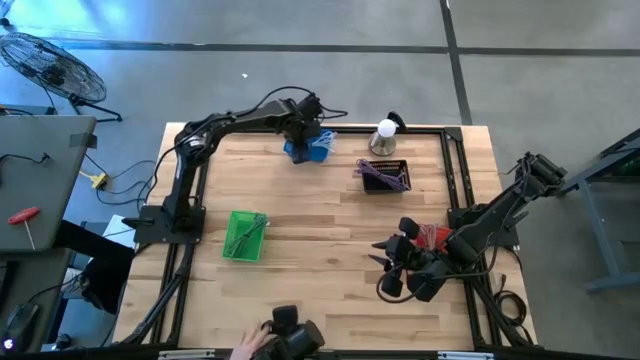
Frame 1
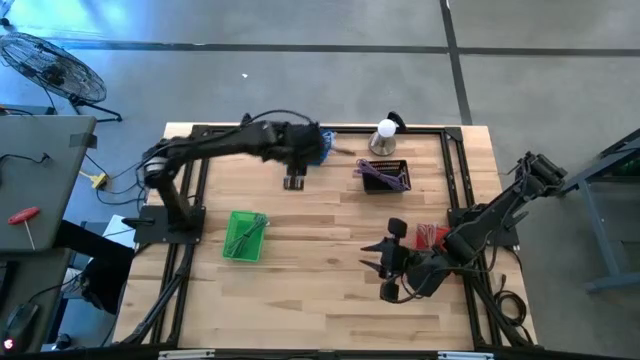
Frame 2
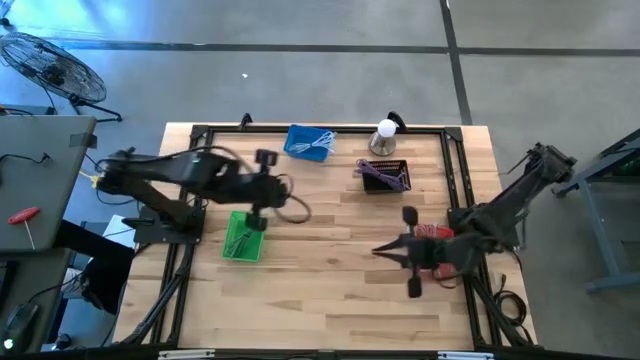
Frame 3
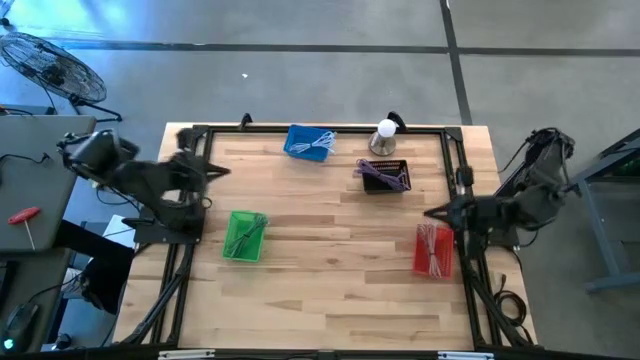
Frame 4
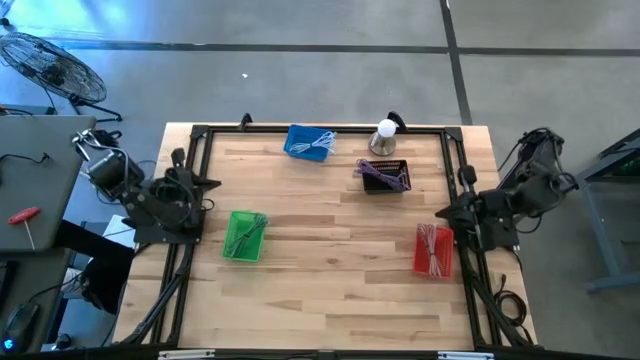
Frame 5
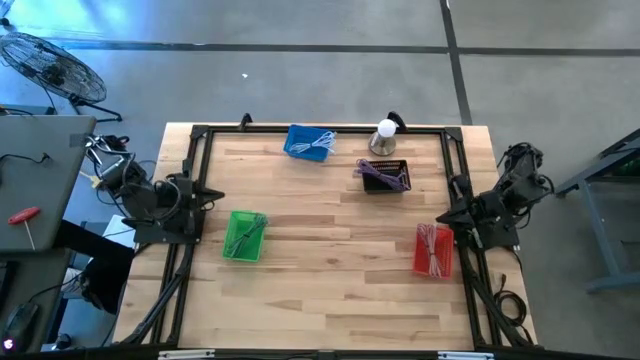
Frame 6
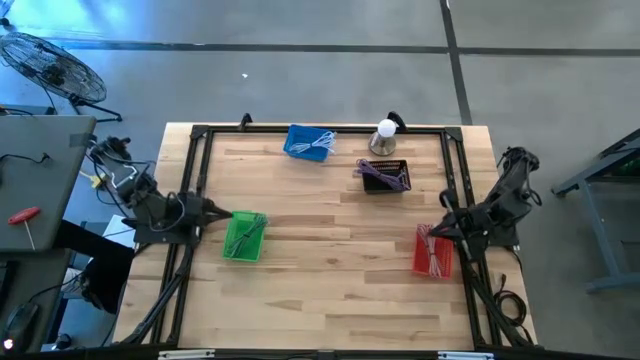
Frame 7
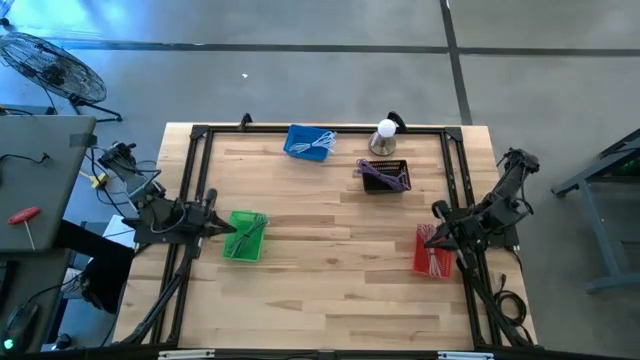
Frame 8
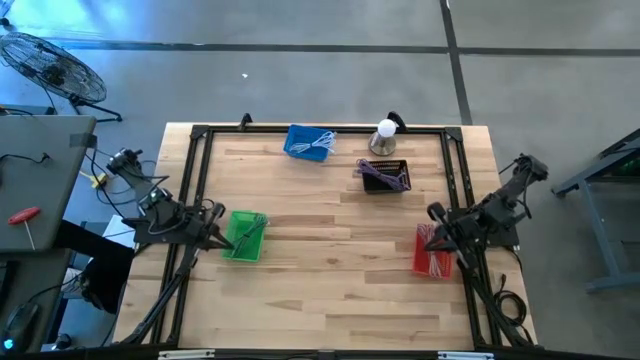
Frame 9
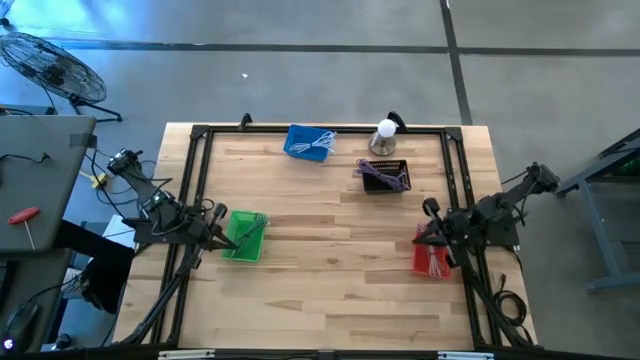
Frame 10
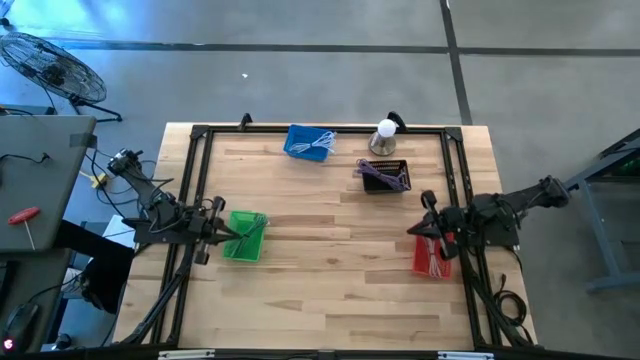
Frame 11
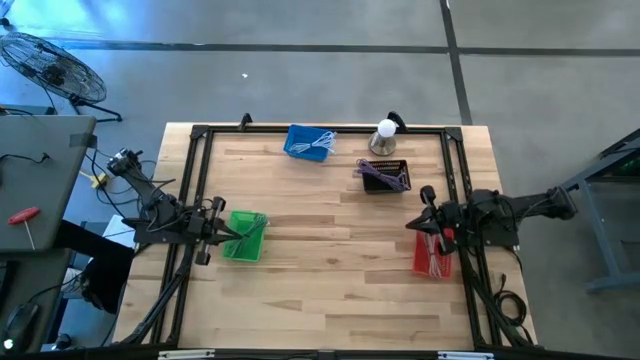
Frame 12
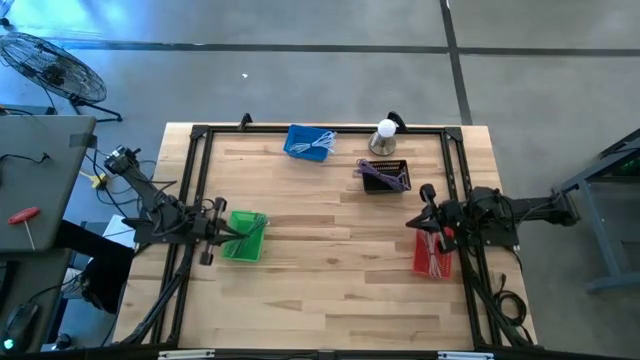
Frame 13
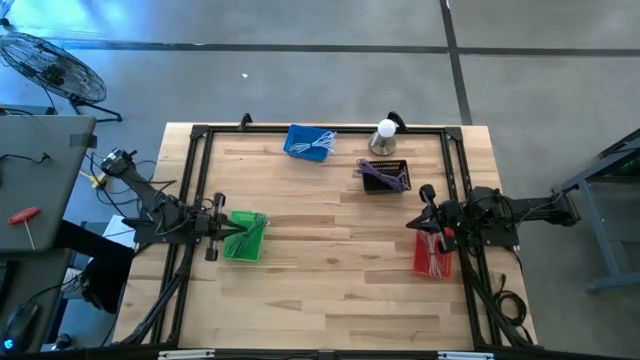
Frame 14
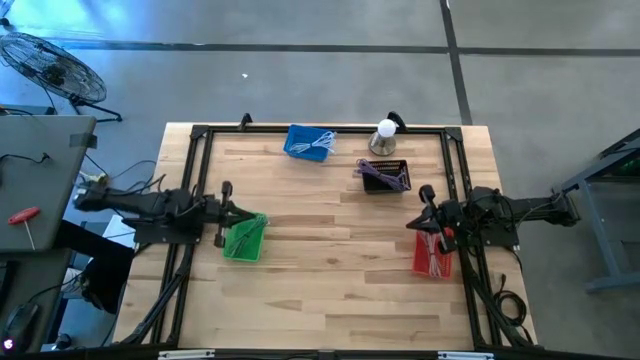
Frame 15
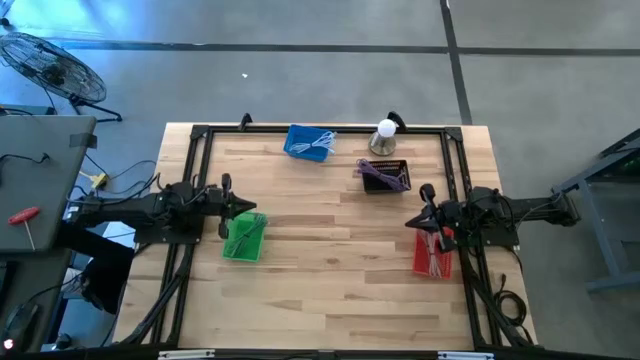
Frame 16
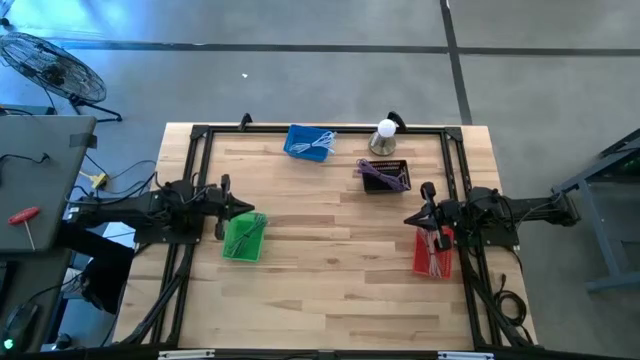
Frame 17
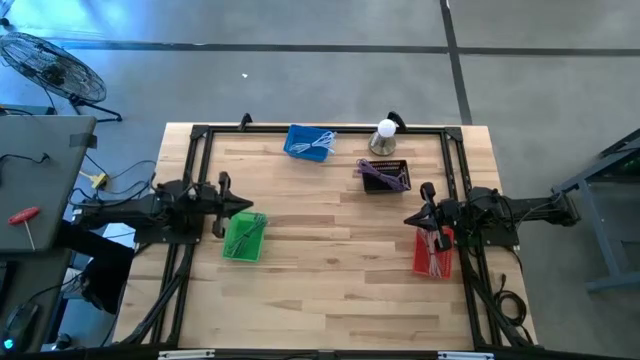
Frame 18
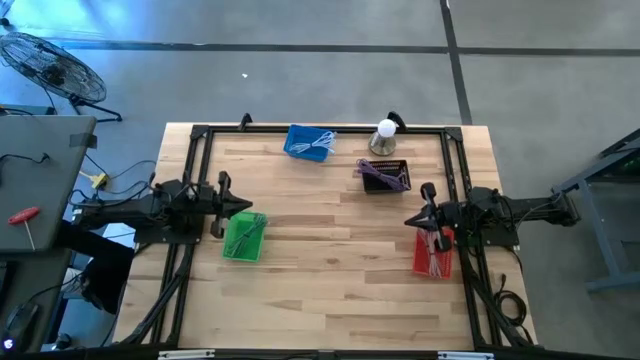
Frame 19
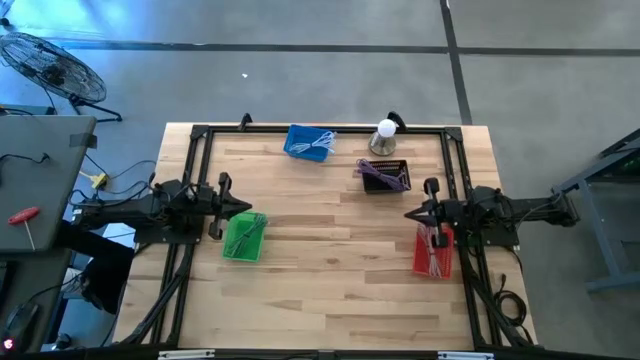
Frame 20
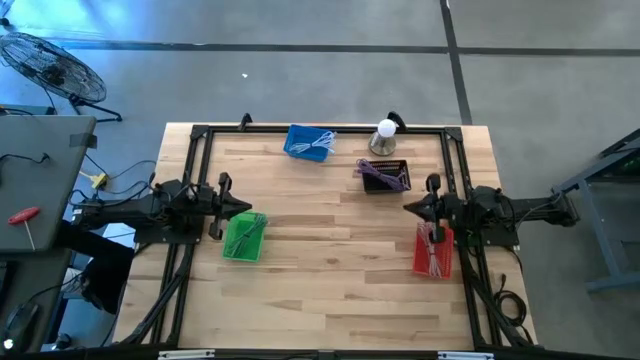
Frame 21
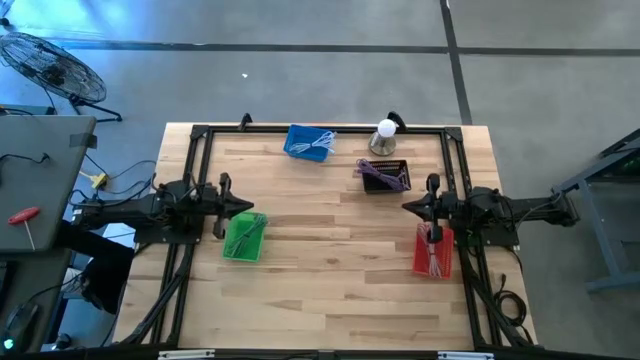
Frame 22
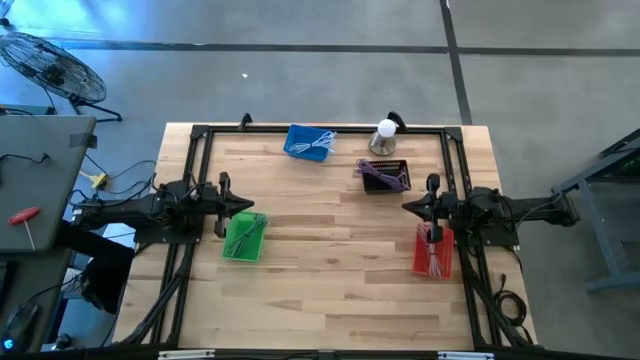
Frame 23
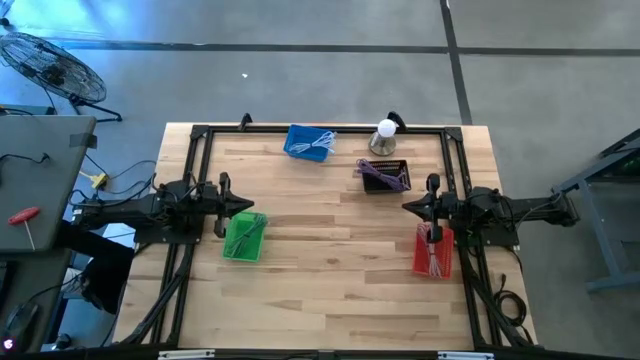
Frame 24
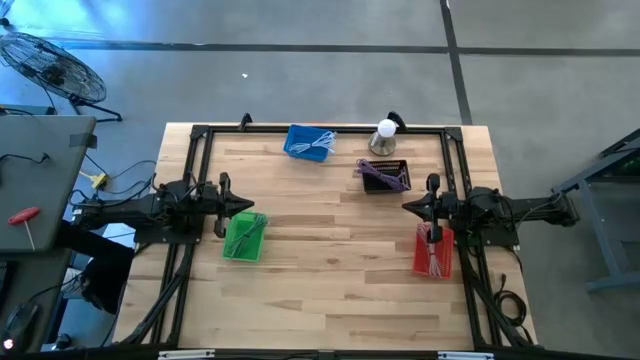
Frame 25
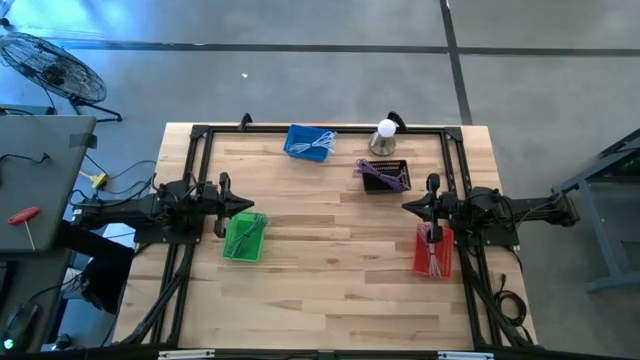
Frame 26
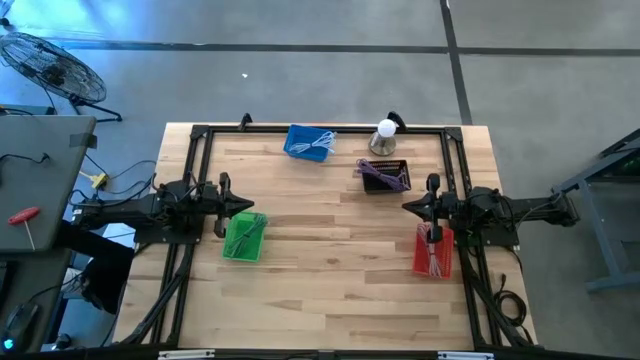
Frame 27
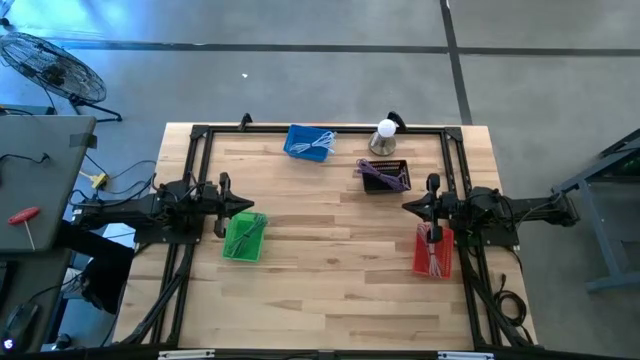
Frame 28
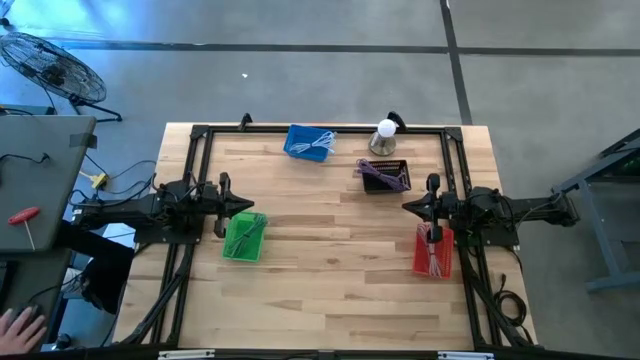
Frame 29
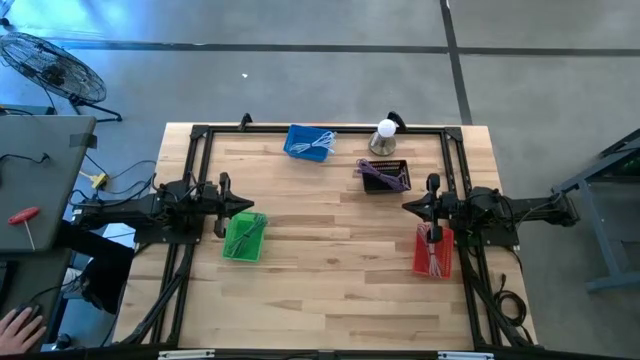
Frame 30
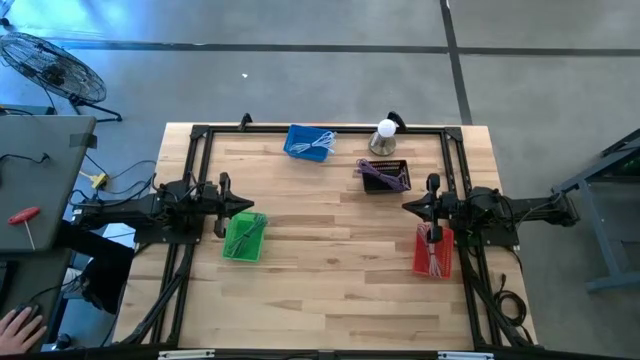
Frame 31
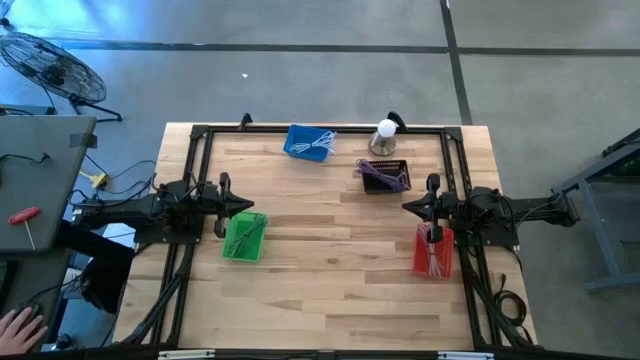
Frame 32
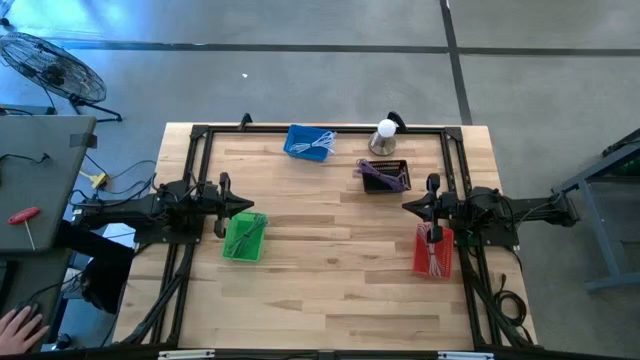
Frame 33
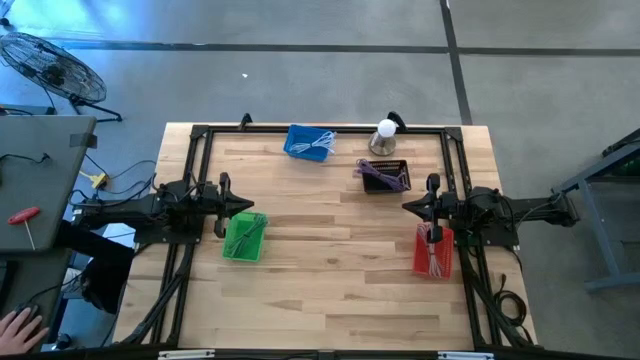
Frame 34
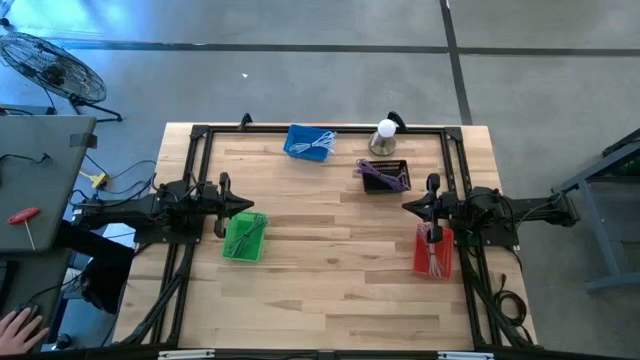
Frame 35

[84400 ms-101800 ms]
Task: Pick & Place USB Port
Return to Home Position

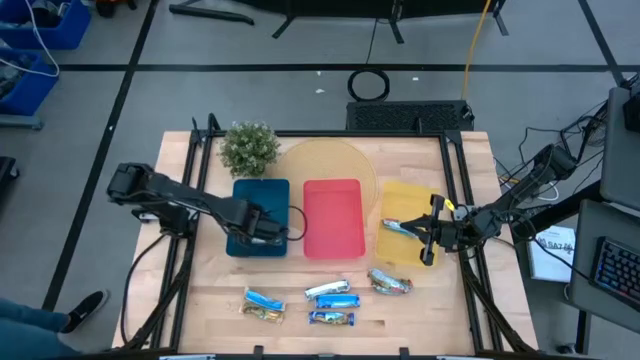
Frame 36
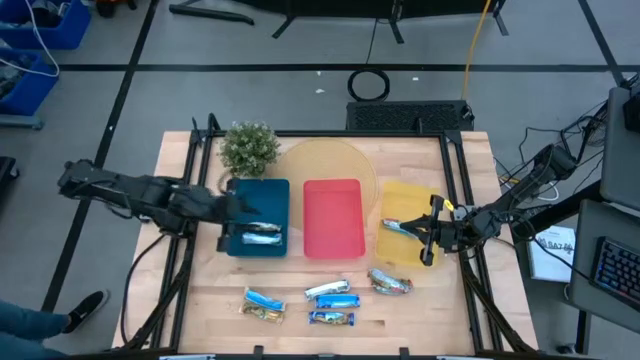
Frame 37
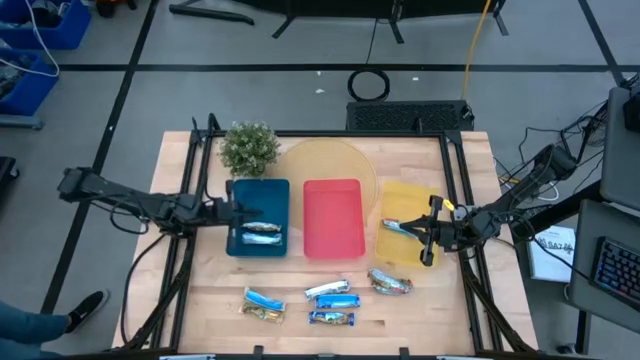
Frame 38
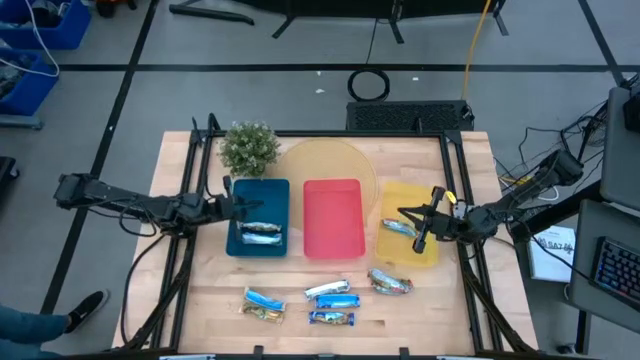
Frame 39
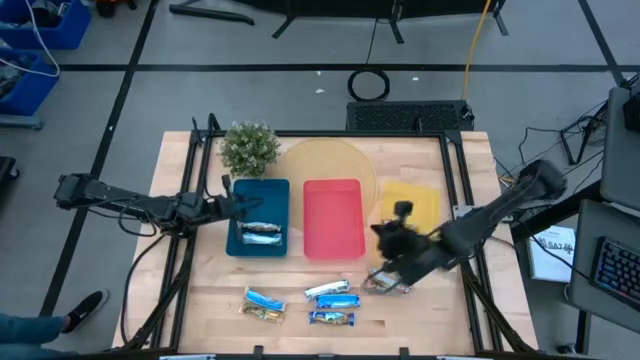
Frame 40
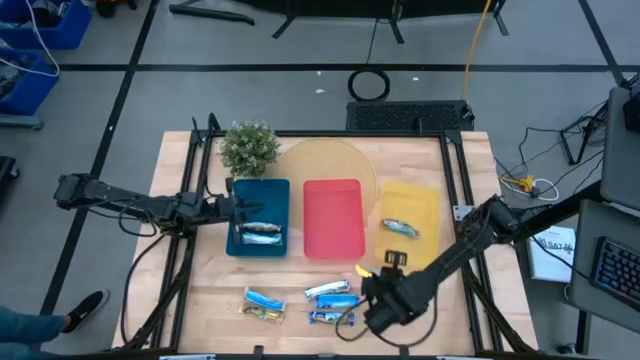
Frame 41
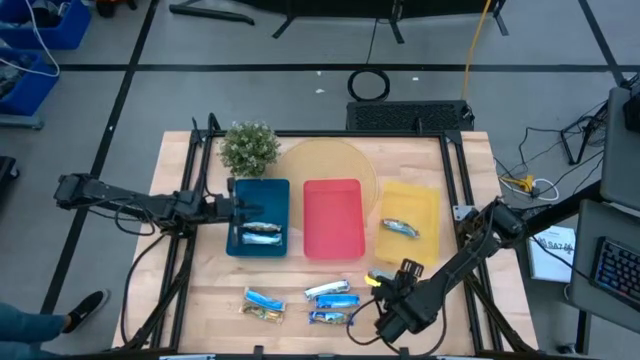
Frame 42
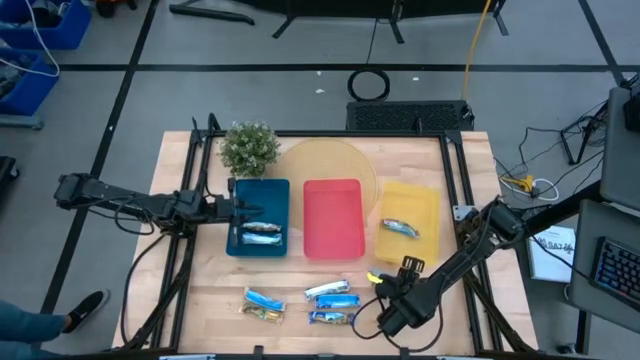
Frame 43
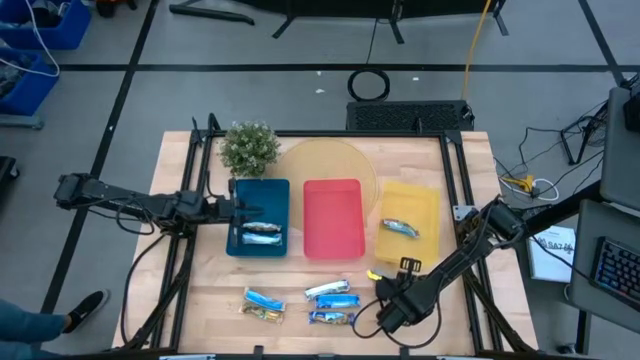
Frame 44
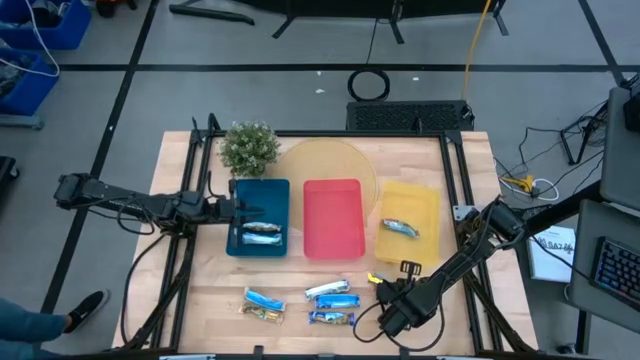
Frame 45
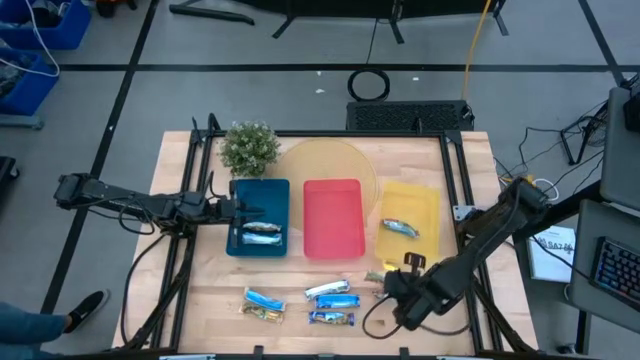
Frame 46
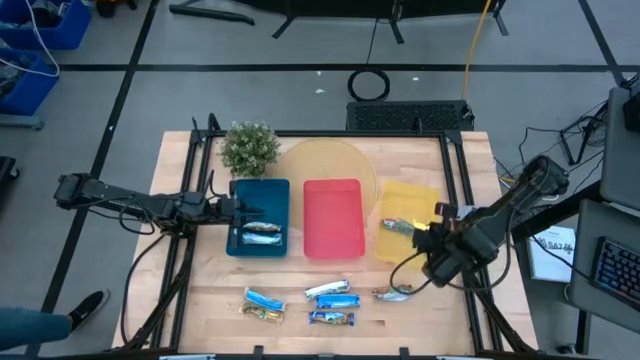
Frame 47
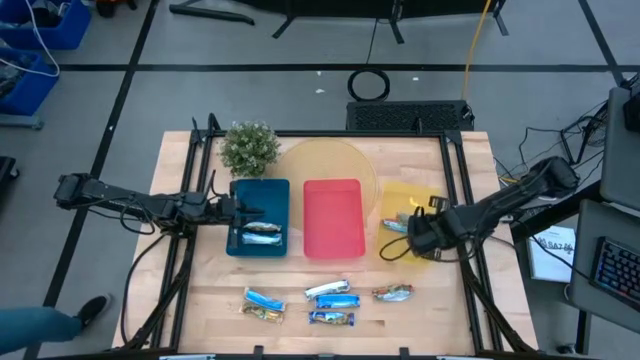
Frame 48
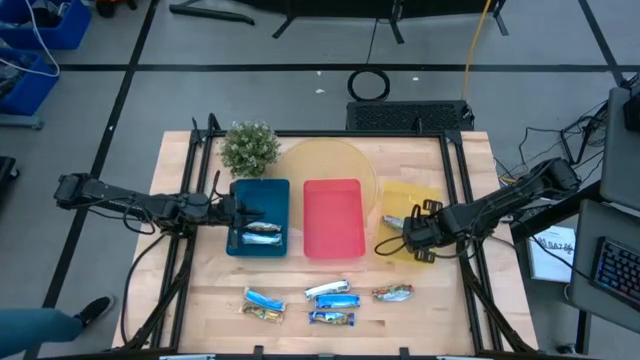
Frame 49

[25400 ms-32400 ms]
Task: Pick and place Granola Bars by type
Put the red granola bar into the yellow bin
